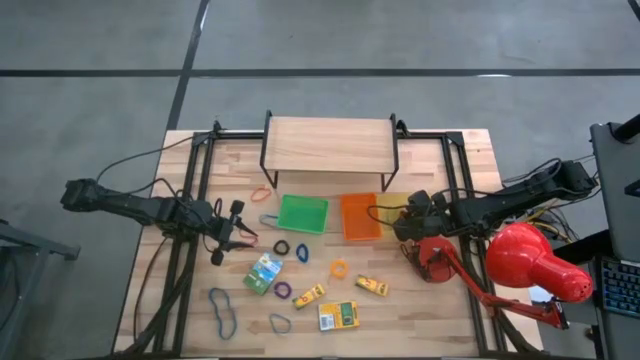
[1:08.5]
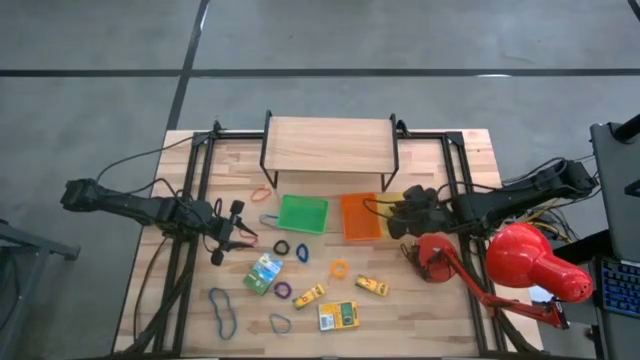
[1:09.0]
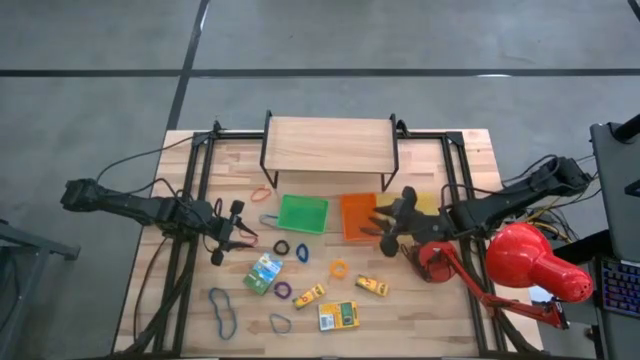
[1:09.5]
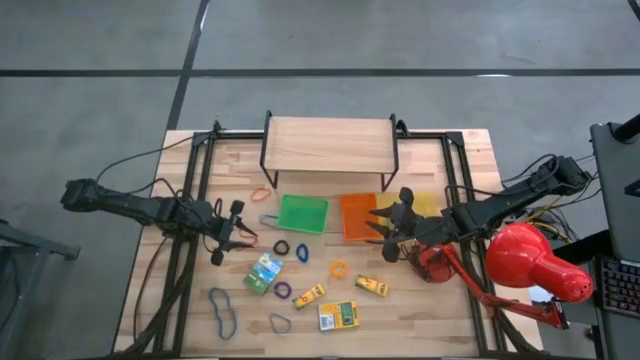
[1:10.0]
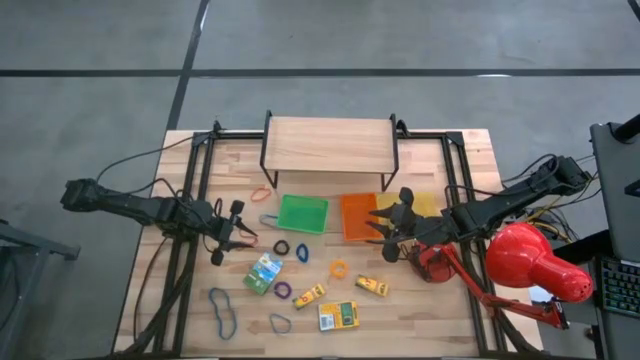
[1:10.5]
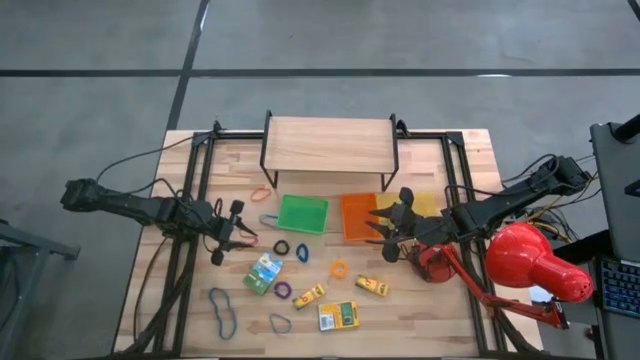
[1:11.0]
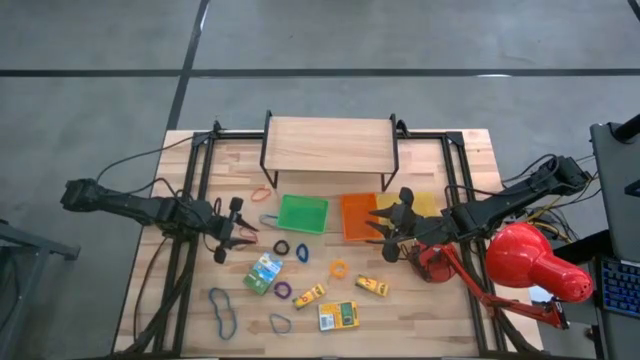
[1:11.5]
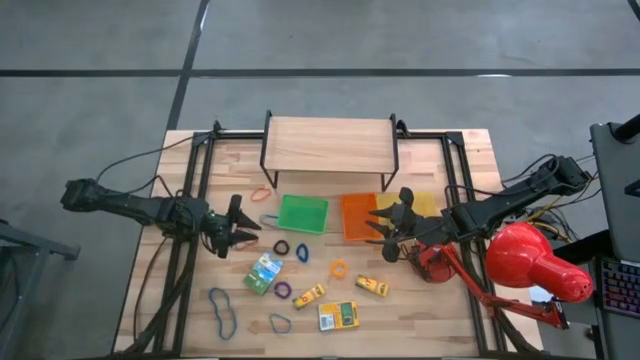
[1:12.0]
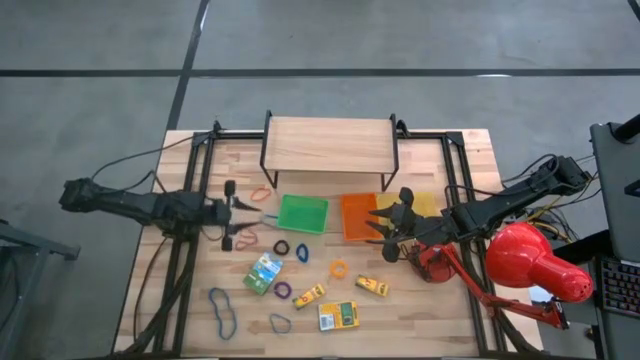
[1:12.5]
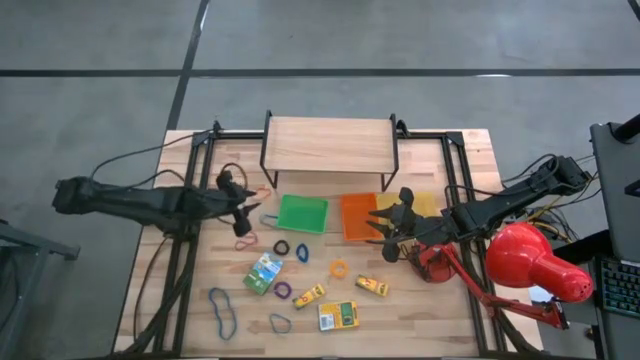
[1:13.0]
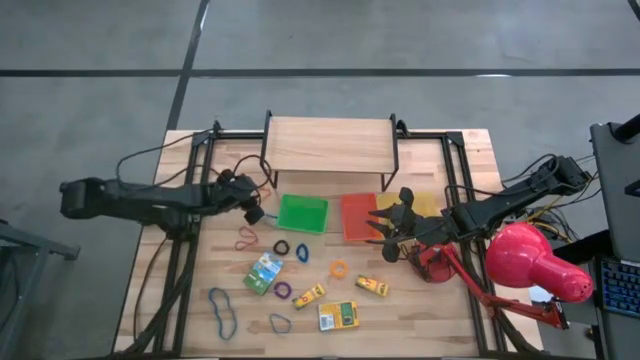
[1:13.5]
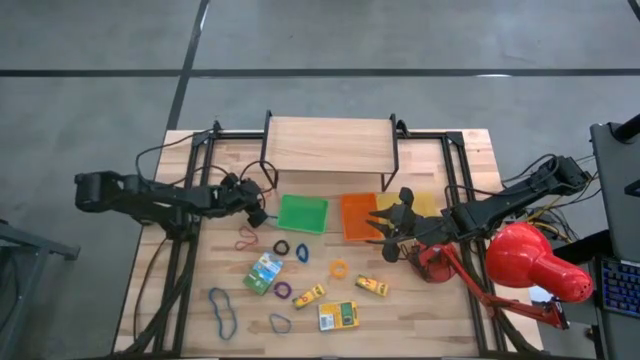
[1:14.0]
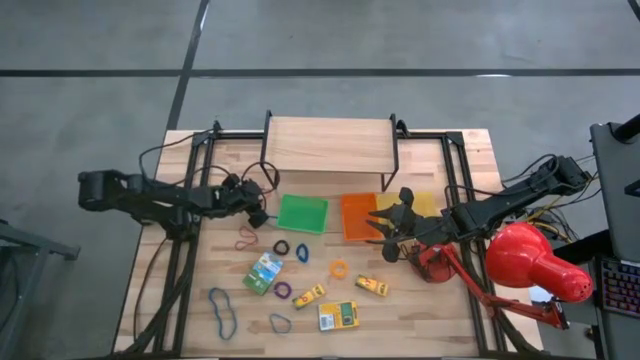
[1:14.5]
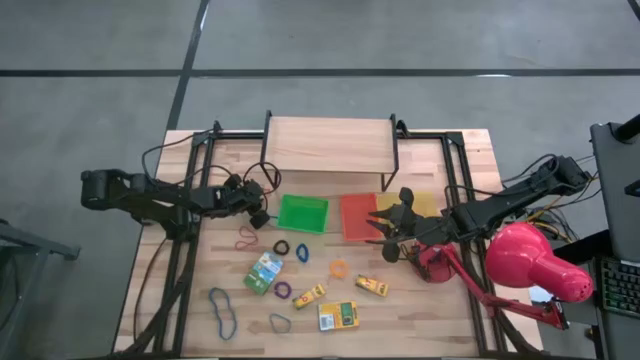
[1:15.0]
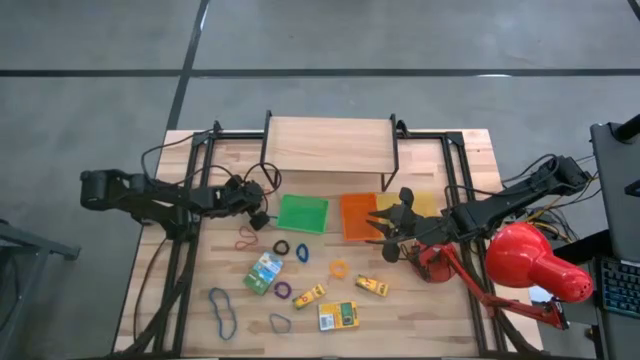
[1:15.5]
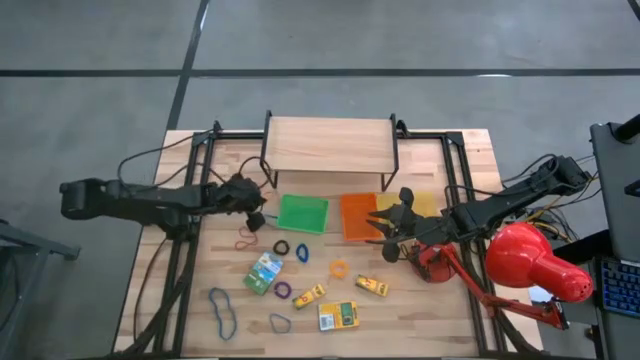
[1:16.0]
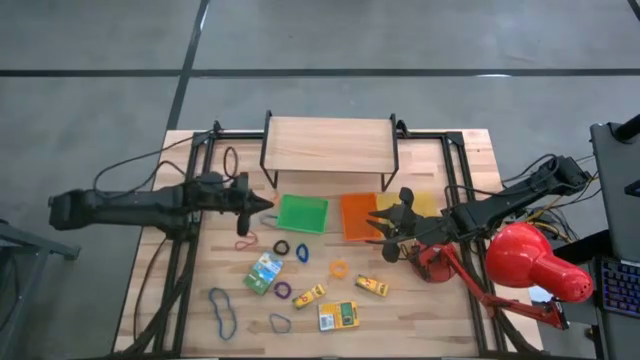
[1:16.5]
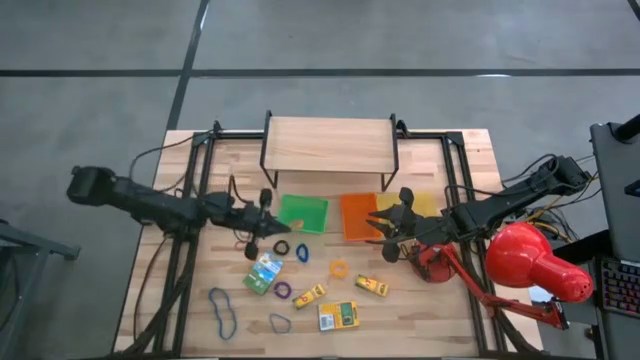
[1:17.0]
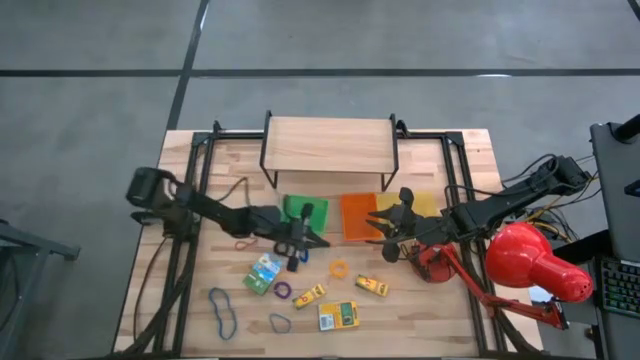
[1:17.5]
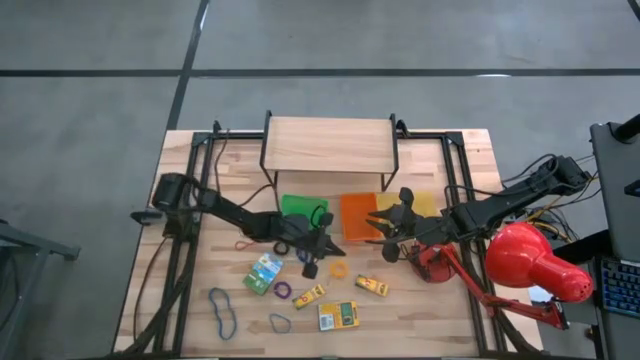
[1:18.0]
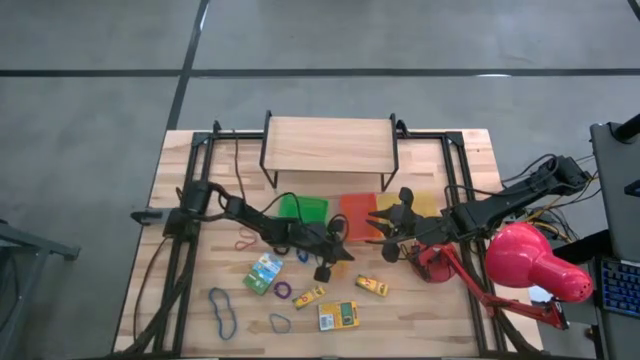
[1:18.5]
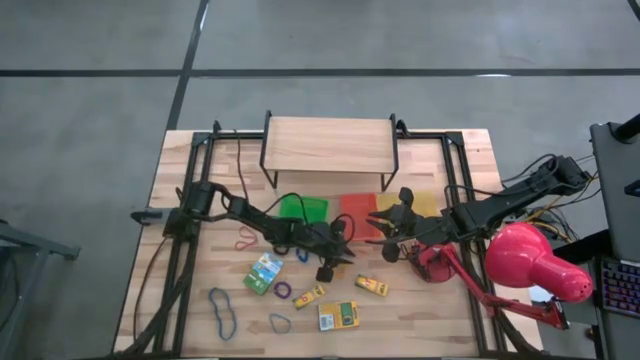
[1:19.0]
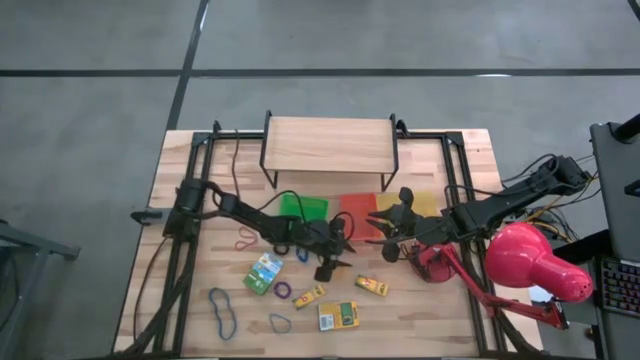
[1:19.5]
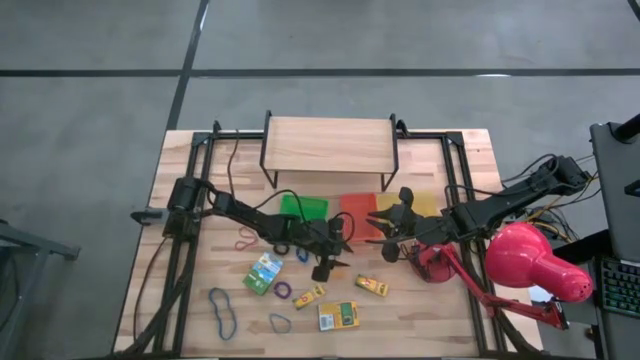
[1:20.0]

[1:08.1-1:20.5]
Task: Pick & Place Office Desk Supplies
Put the orange rubber band into the yellow bin

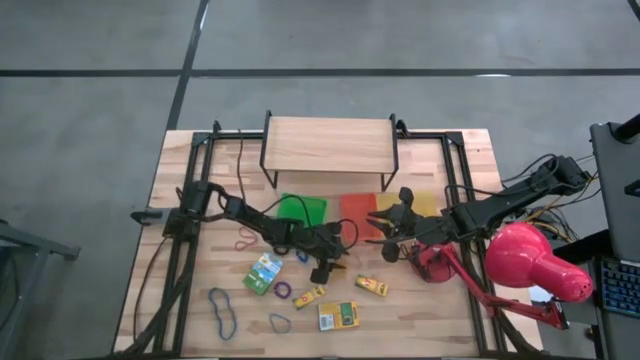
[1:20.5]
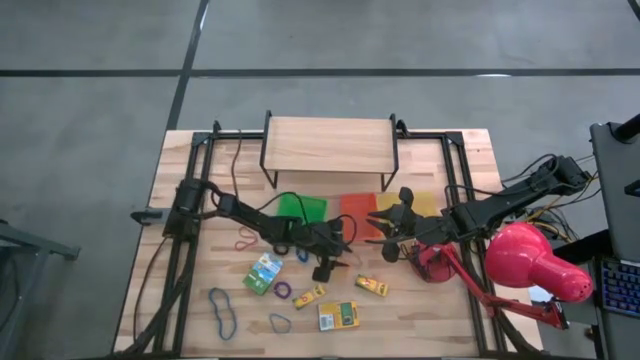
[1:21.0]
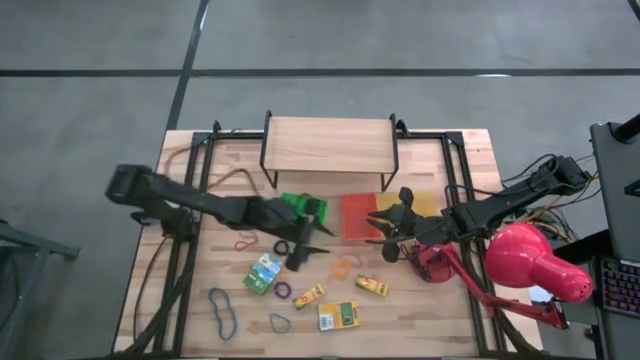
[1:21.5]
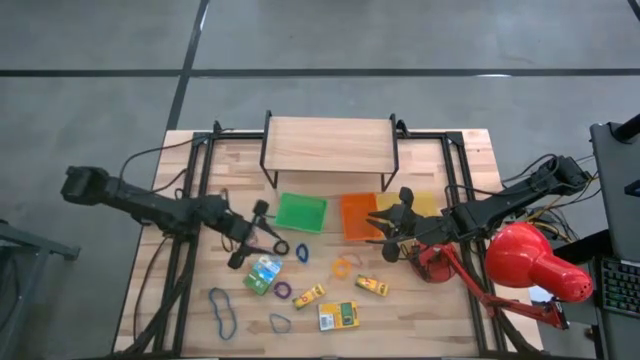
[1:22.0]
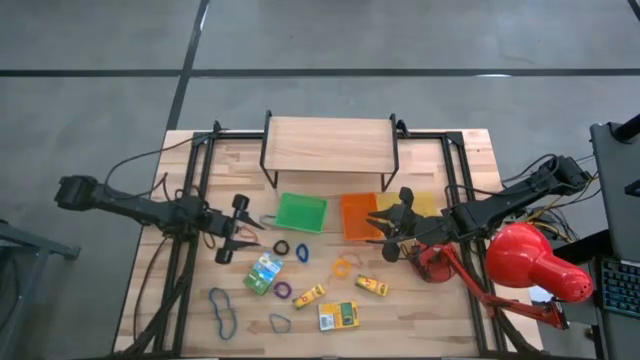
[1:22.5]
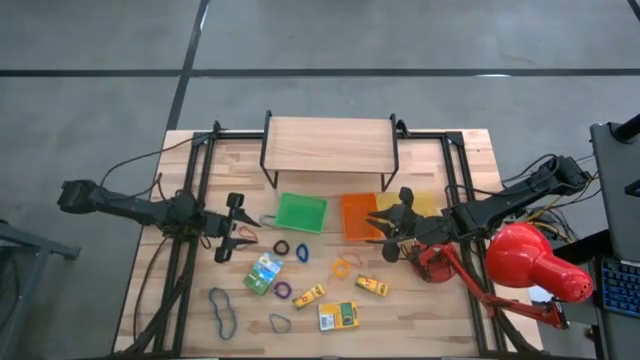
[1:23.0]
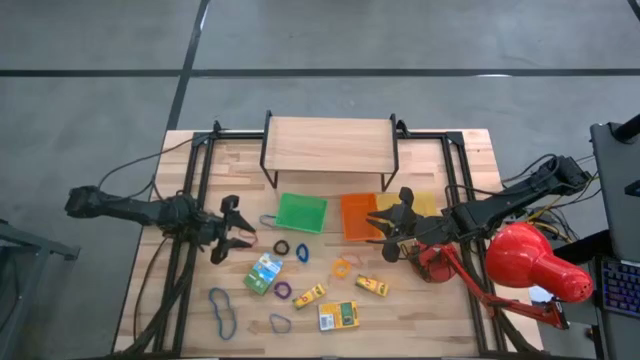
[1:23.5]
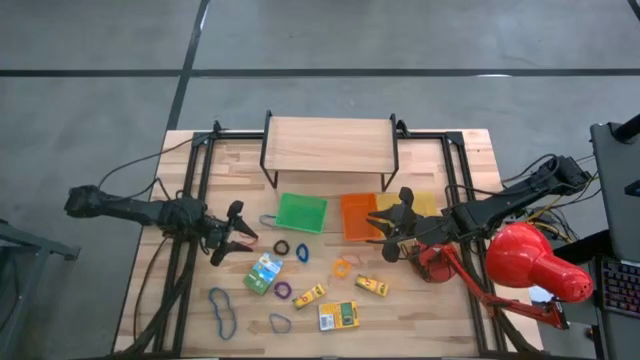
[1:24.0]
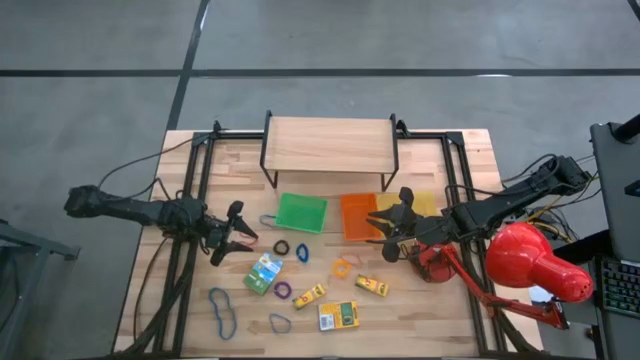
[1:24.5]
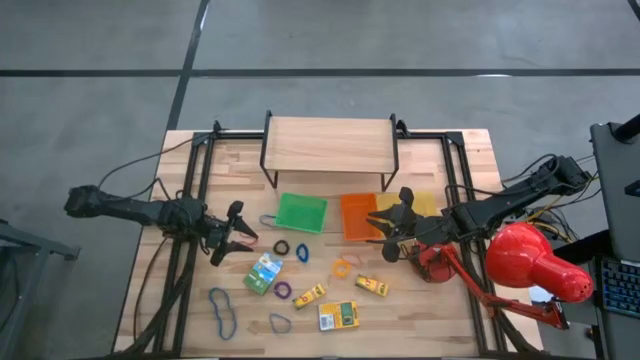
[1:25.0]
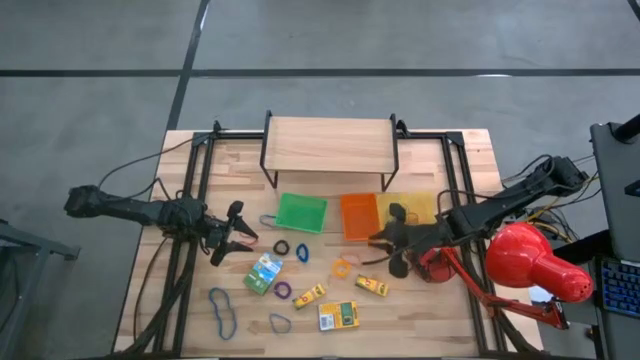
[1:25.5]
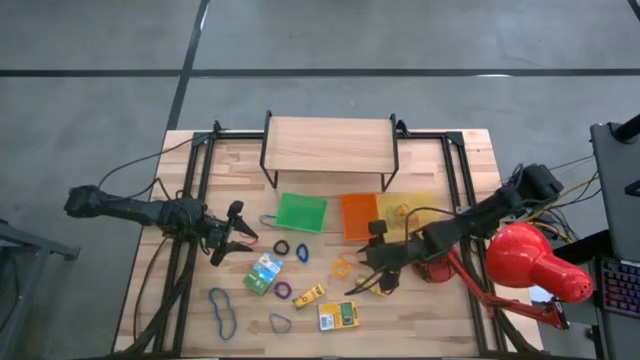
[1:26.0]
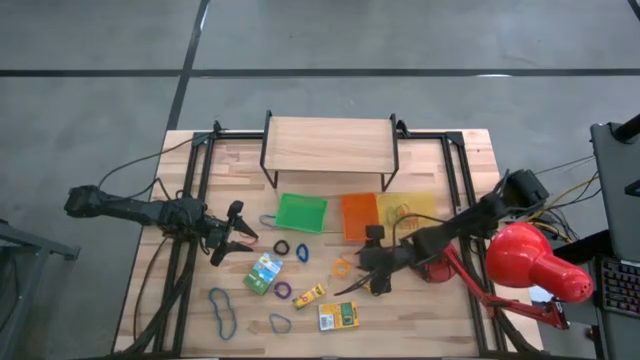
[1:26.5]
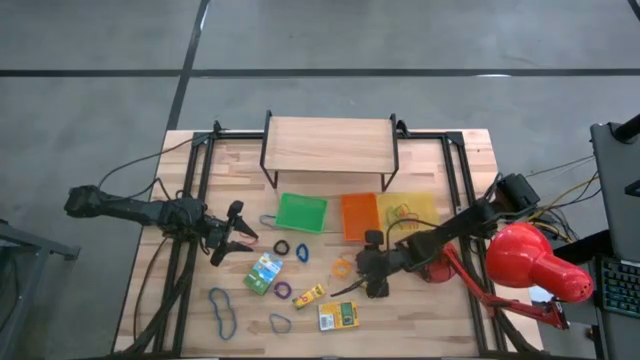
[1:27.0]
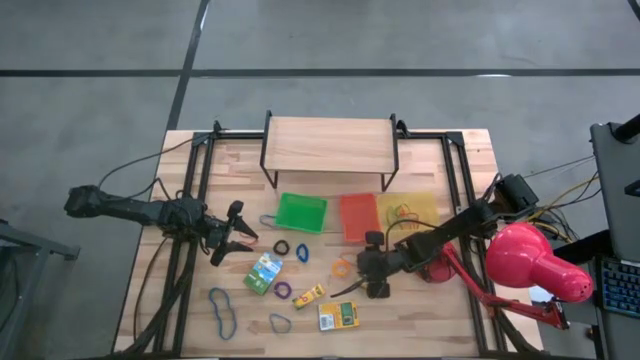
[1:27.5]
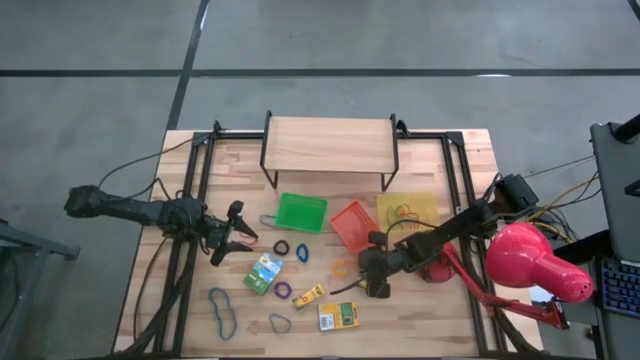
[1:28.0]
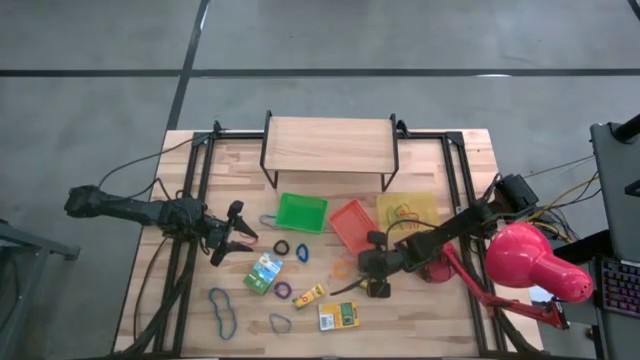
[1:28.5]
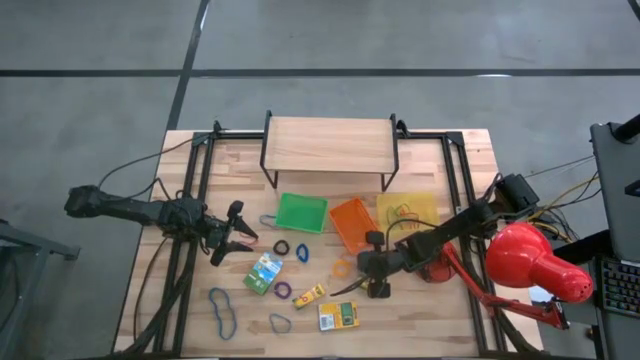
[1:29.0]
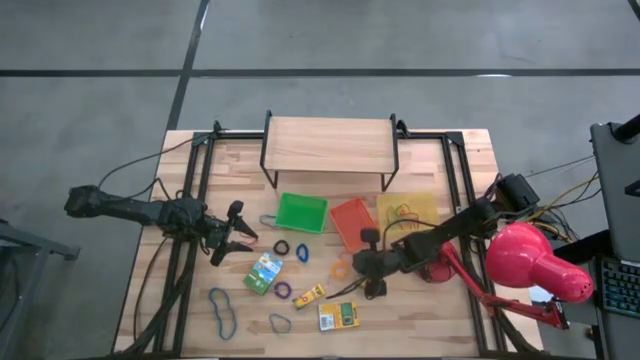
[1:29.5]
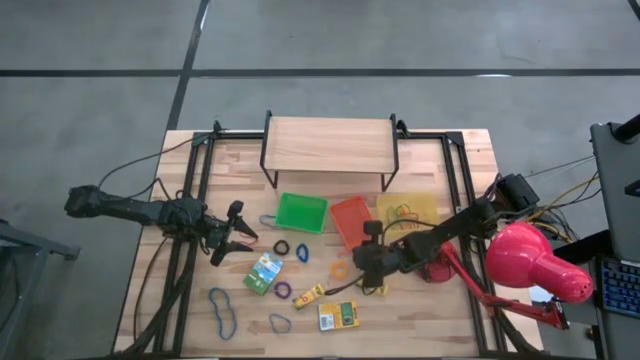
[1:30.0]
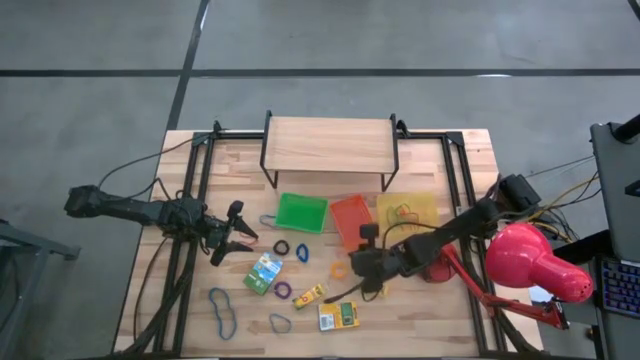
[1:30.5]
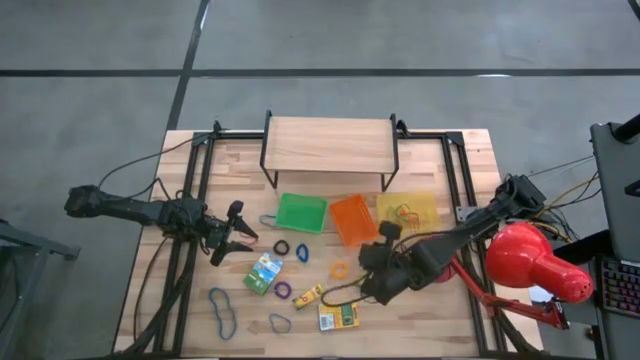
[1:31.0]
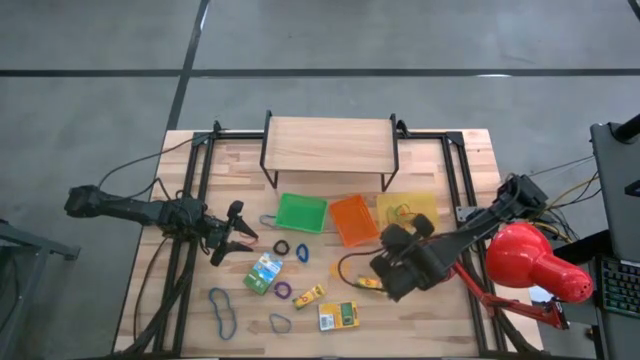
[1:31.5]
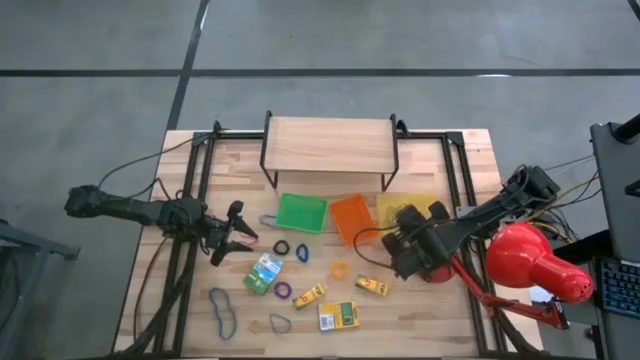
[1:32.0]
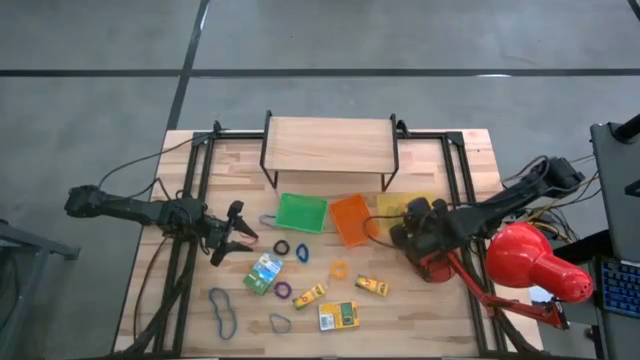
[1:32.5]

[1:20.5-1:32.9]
Put the orange rubber band into the yellow bin
